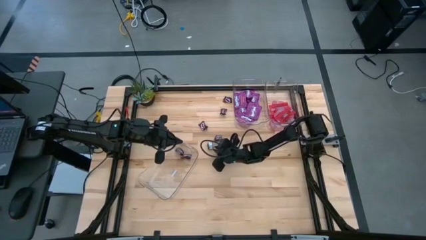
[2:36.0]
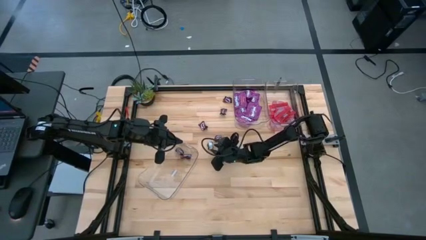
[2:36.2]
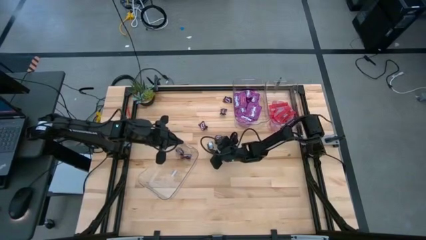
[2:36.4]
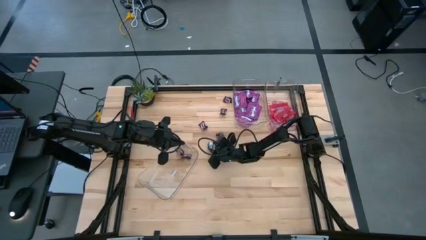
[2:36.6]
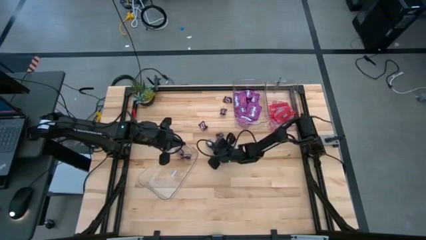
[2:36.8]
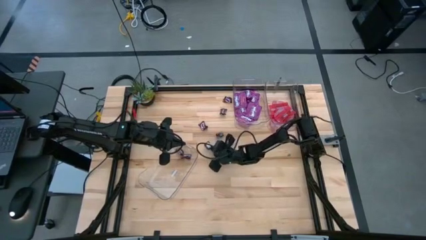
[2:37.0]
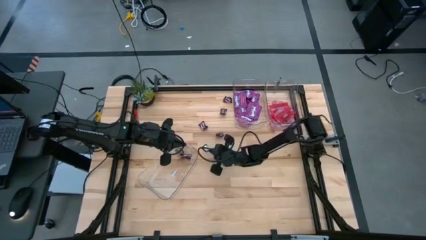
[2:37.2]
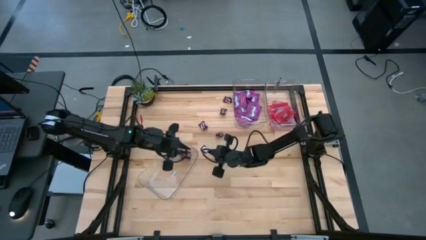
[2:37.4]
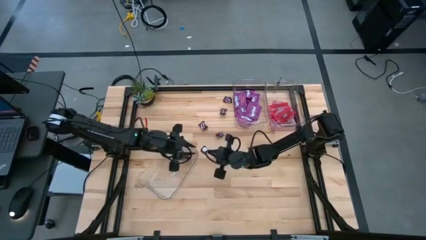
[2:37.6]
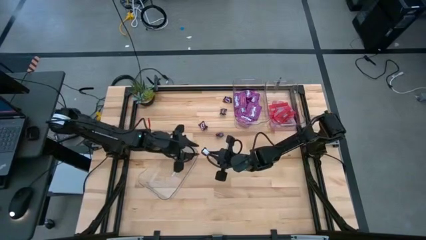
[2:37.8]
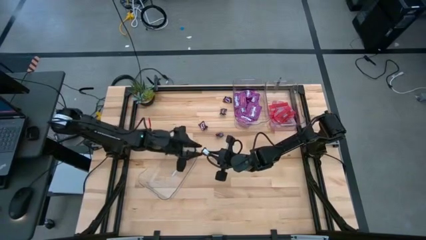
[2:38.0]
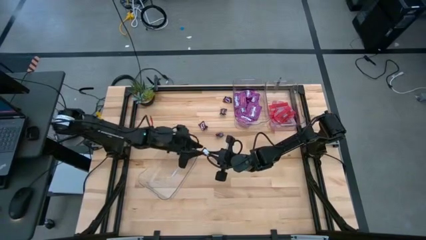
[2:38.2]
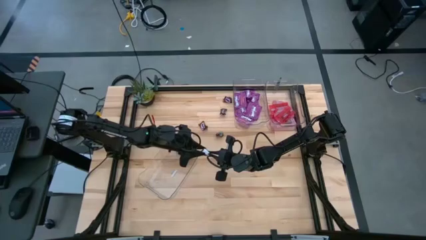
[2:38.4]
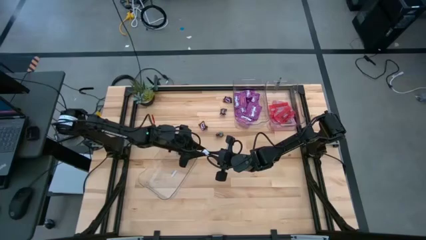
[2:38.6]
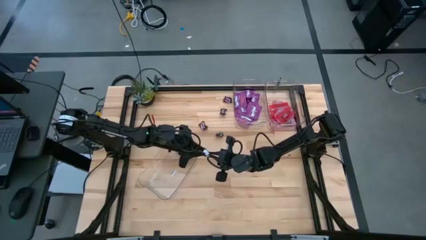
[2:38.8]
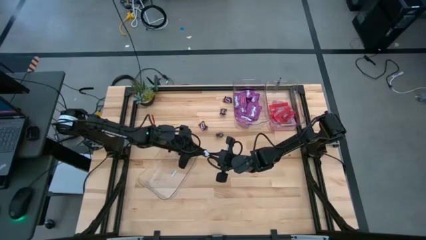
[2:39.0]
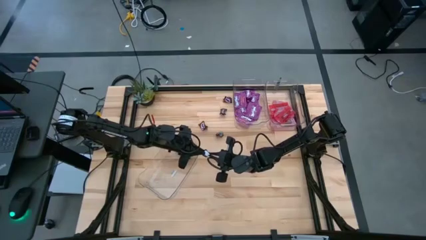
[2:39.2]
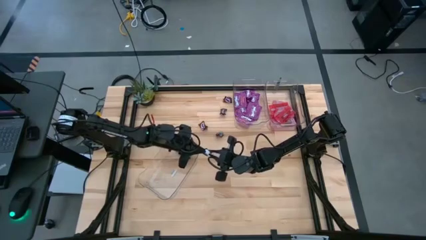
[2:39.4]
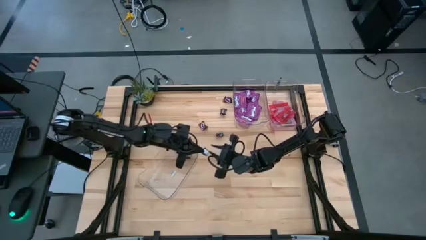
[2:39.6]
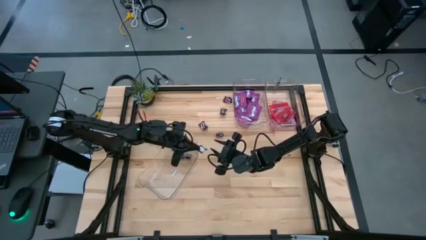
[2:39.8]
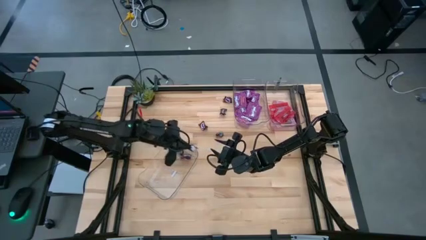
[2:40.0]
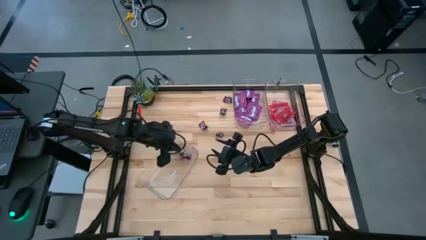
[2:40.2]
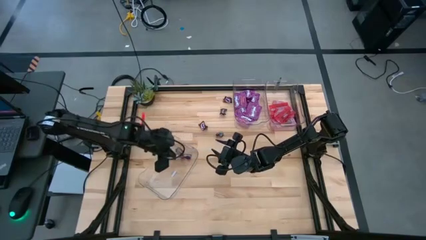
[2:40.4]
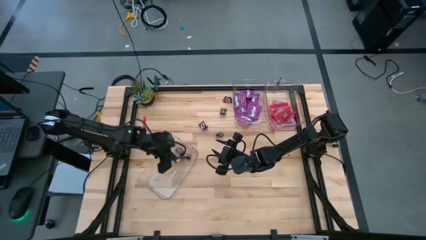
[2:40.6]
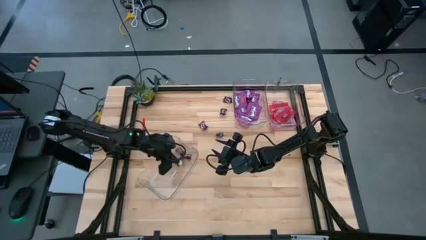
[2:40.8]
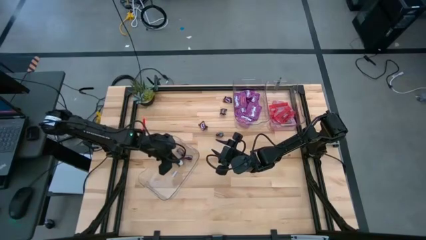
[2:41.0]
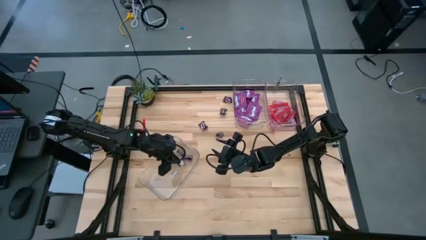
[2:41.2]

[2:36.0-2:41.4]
Task: Sort candy
Put the brown candy into the bottom transparent bin

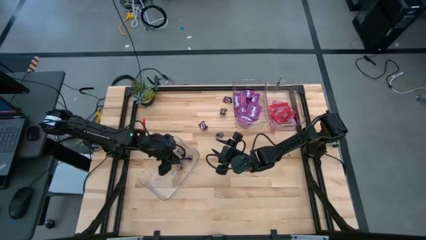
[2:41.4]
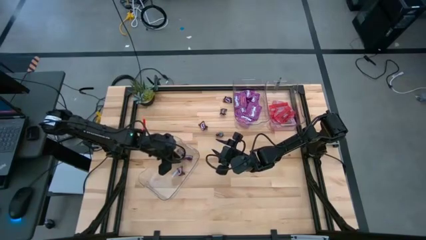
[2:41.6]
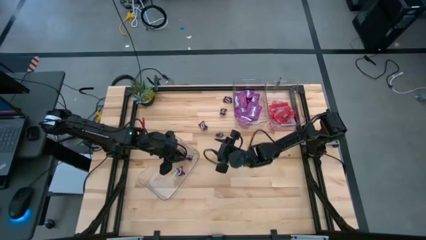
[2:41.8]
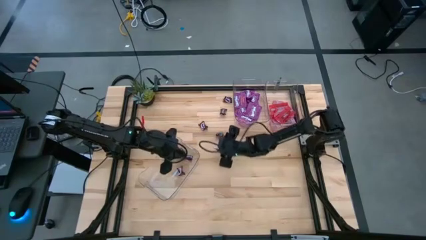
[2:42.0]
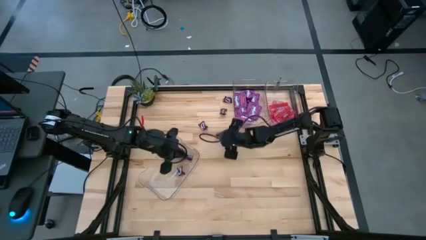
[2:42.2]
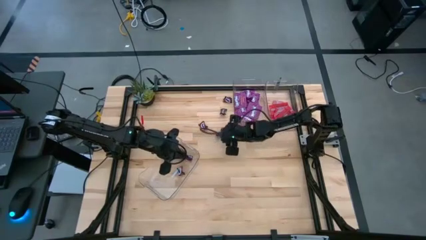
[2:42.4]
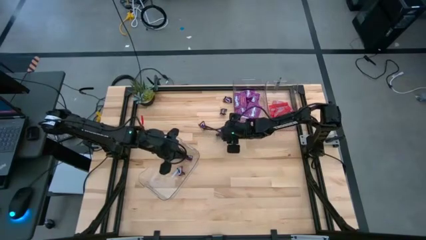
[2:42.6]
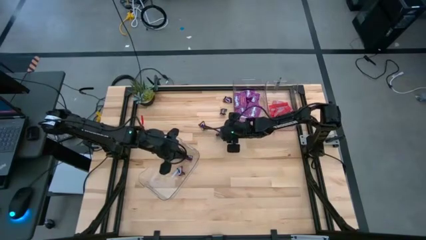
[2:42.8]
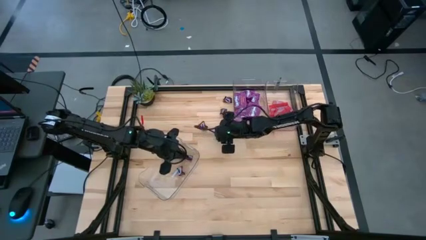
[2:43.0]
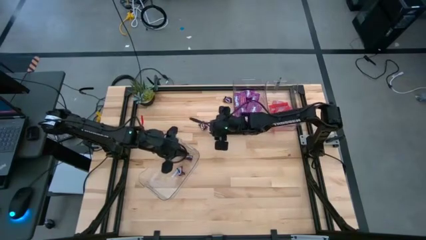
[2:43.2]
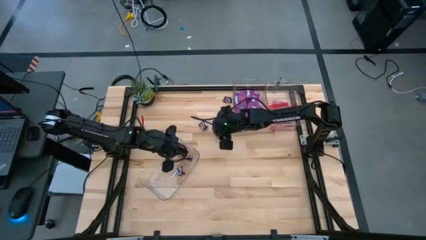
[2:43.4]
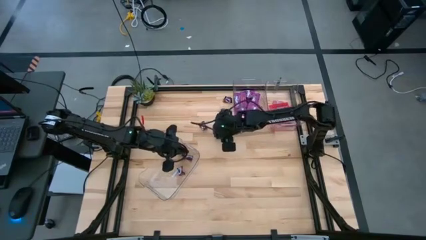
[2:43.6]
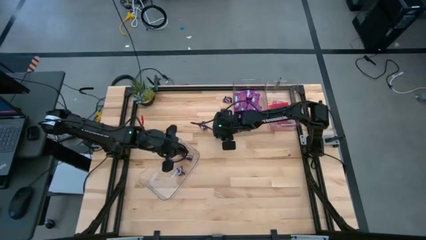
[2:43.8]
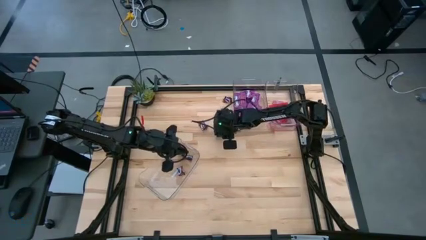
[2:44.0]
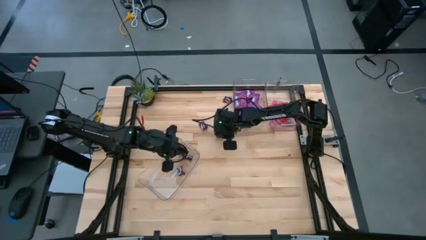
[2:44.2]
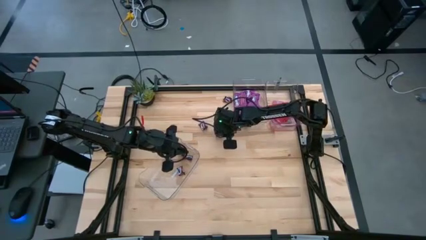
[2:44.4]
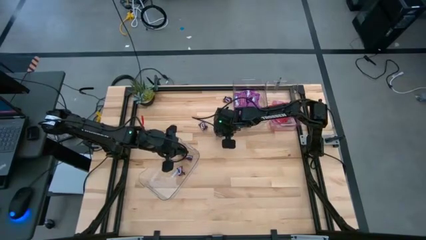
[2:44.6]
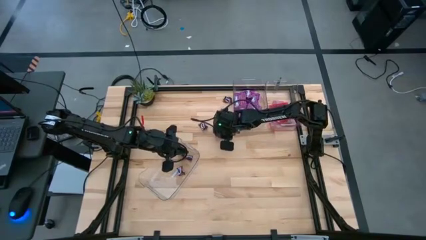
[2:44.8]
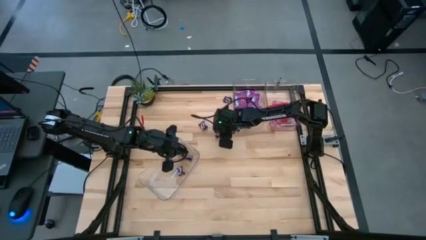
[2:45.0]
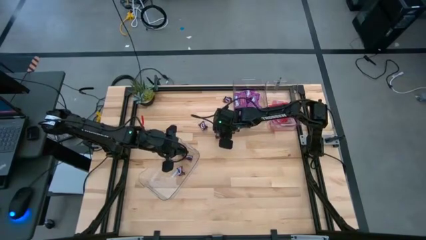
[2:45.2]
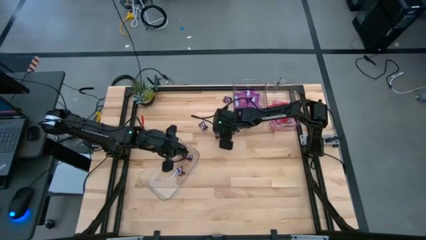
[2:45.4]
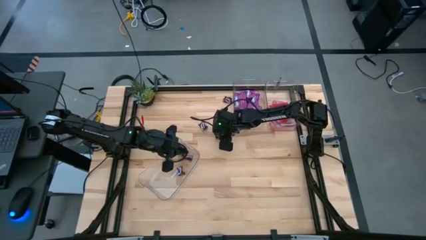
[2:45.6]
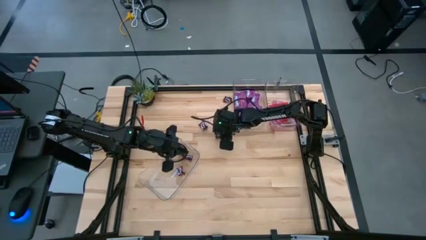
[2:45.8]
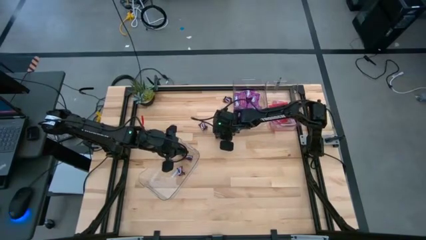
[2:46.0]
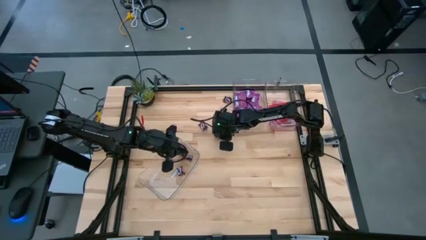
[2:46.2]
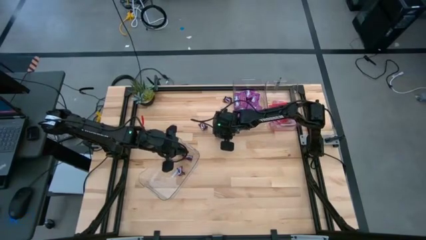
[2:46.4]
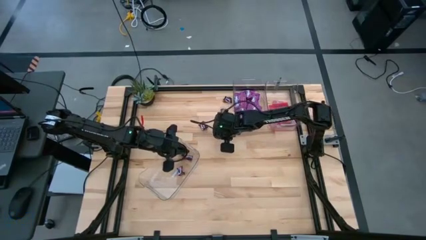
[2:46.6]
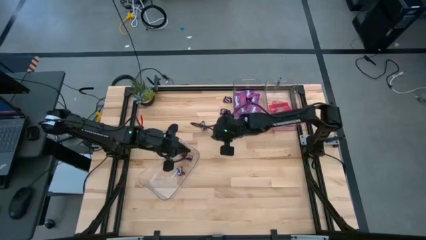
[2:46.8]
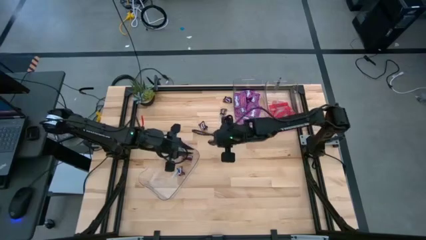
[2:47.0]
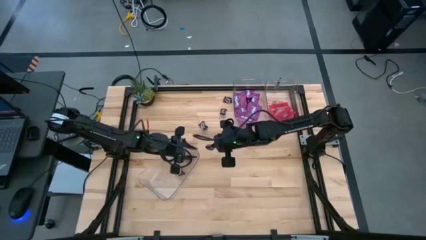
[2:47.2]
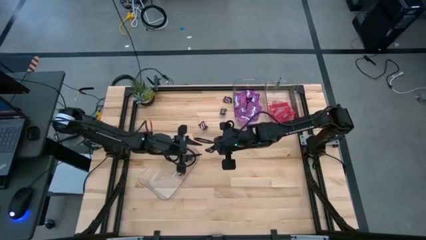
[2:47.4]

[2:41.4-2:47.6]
Put the brown candy into the bottom transparent bin

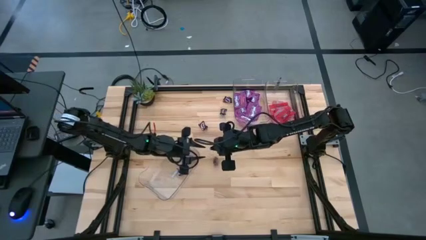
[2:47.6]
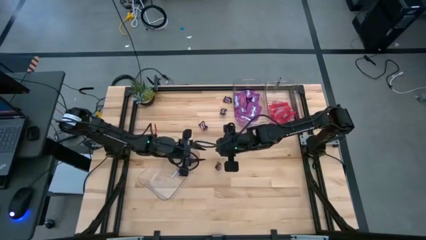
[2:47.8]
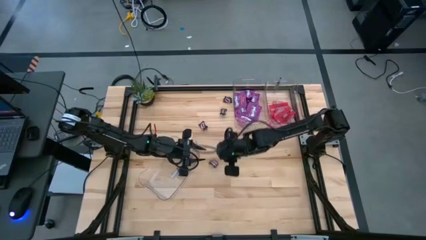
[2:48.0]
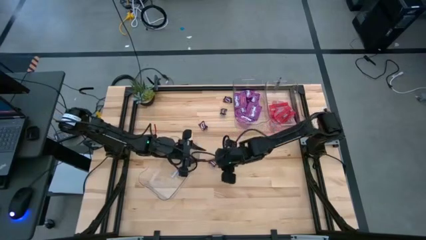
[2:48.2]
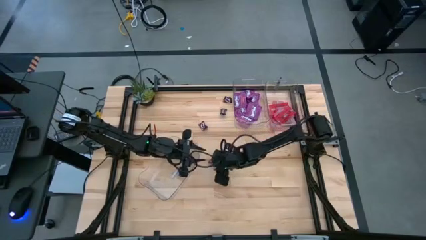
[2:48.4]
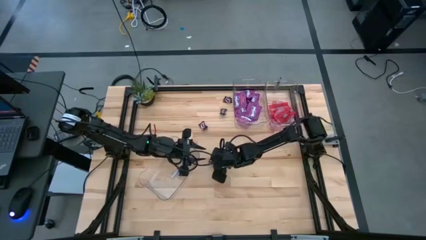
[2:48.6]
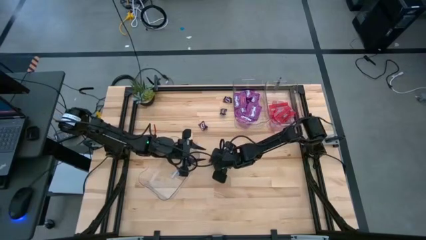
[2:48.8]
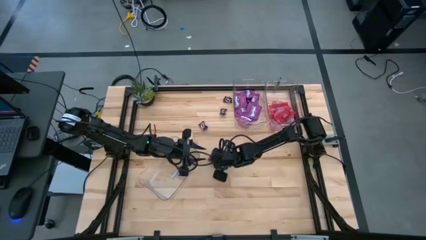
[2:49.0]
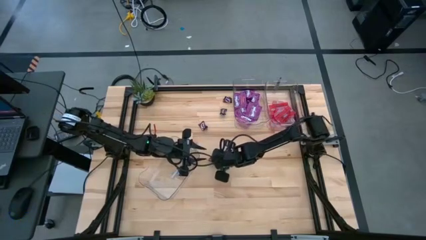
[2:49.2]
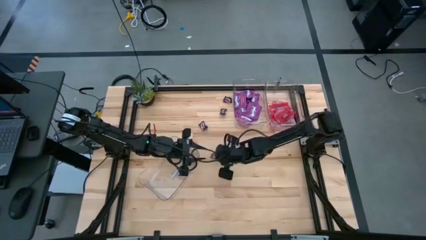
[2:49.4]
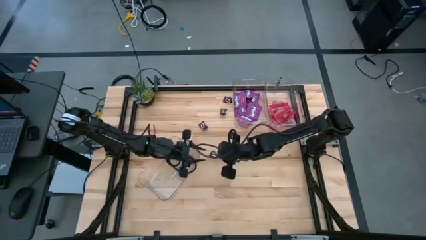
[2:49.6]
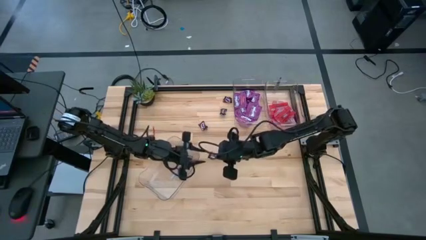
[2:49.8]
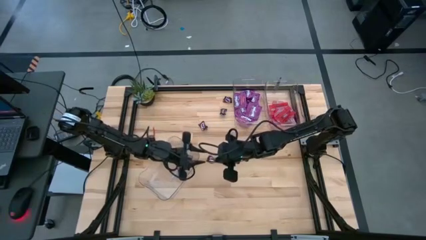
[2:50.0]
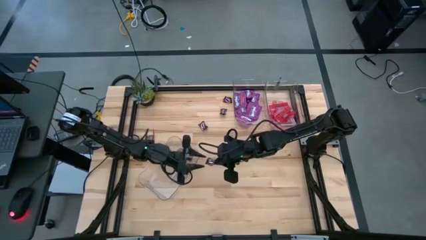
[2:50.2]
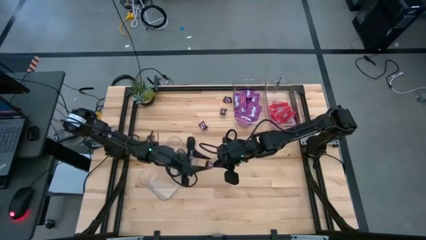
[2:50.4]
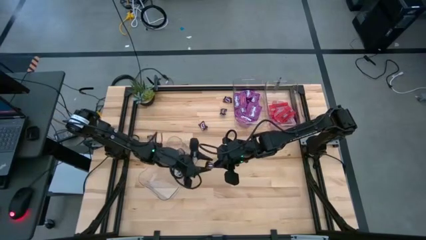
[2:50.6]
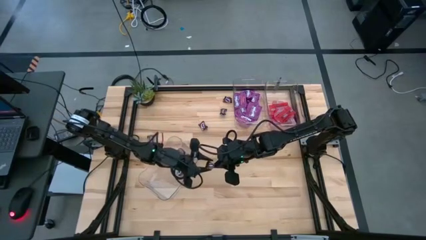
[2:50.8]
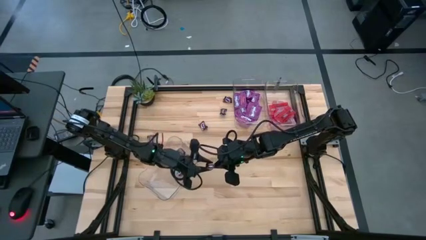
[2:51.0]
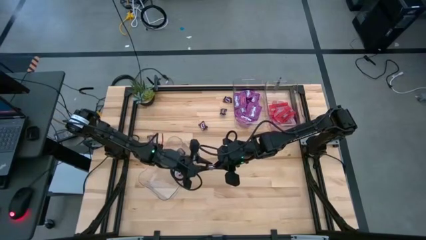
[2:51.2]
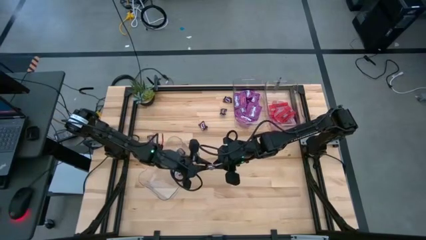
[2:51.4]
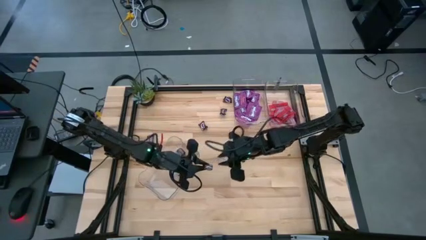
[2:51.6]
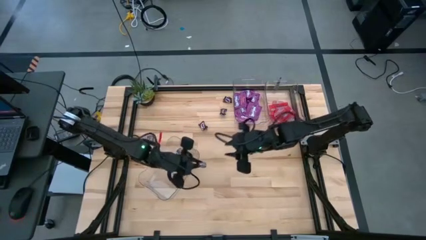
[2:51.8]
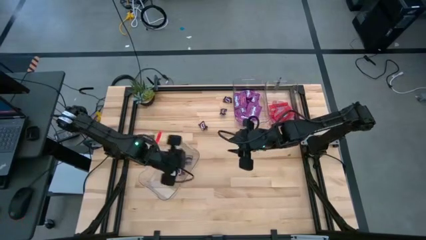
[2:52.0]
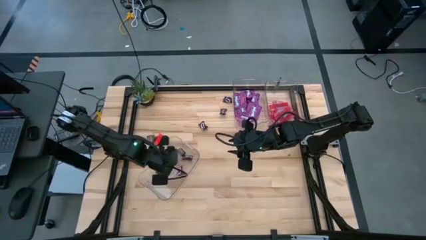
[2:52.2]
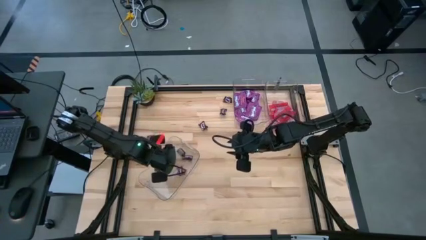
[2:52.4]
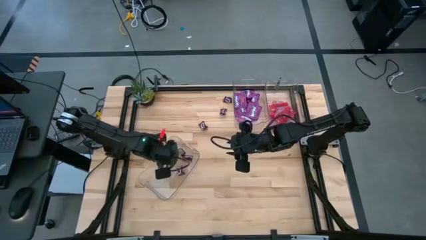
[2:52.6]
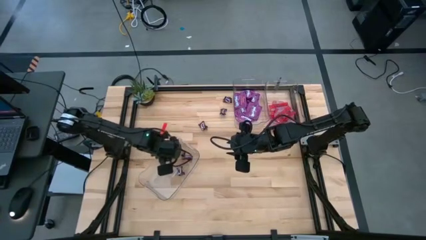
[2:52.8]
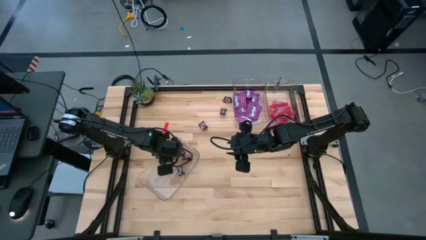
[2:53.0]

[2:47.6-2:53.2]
Put the brown candy into the bottom transparent bin
